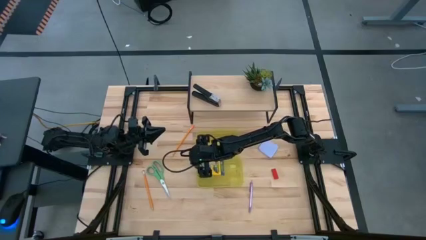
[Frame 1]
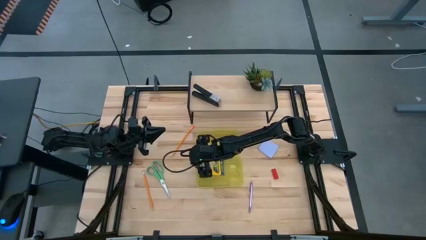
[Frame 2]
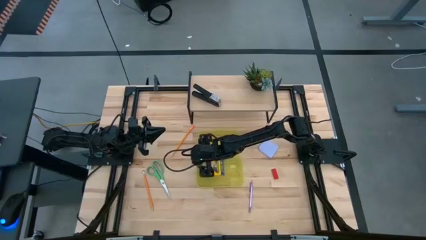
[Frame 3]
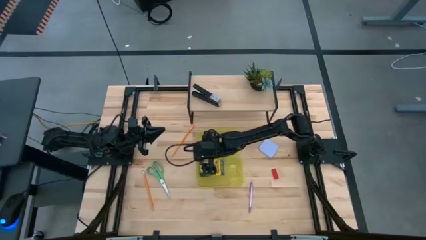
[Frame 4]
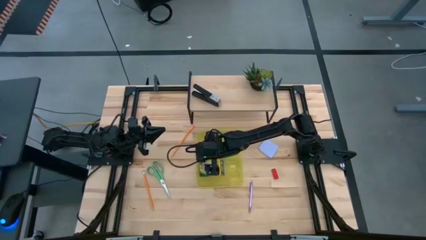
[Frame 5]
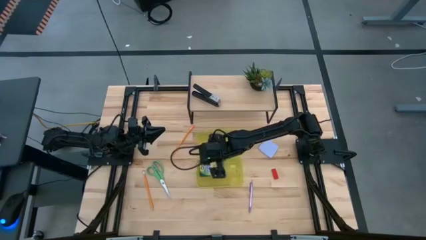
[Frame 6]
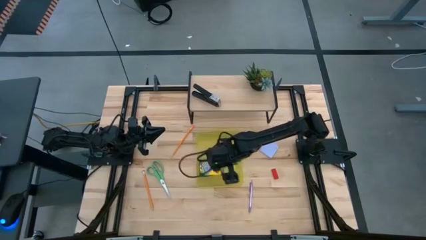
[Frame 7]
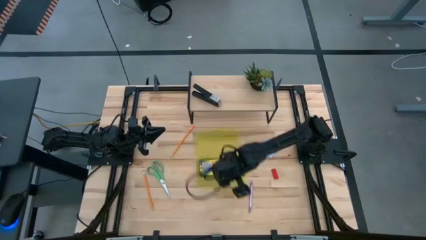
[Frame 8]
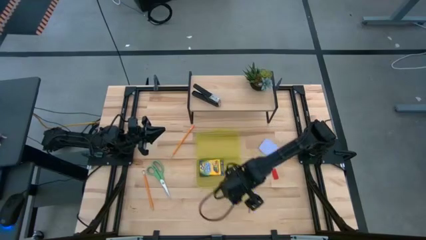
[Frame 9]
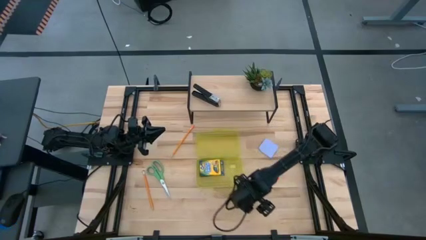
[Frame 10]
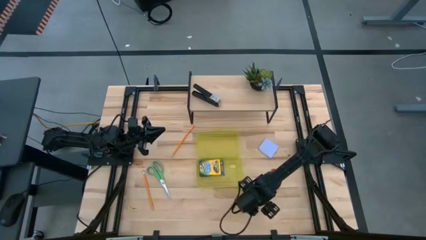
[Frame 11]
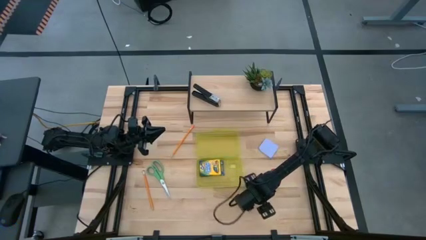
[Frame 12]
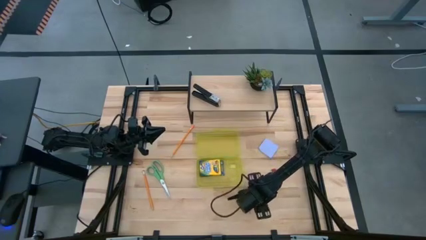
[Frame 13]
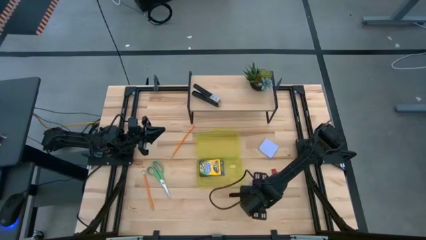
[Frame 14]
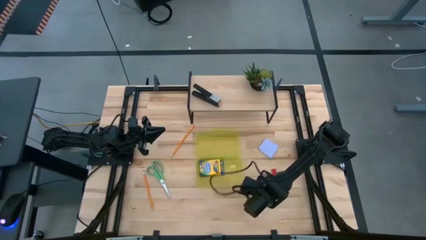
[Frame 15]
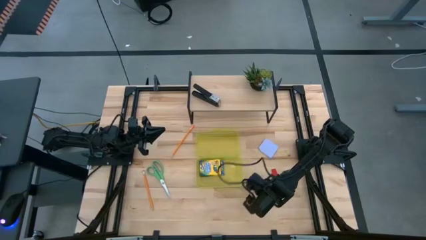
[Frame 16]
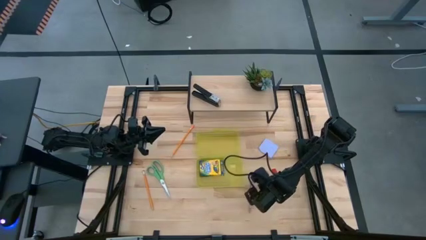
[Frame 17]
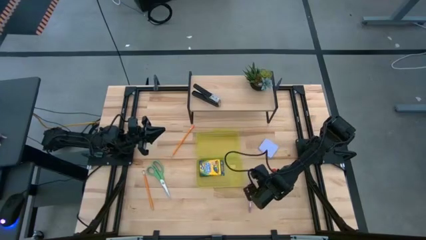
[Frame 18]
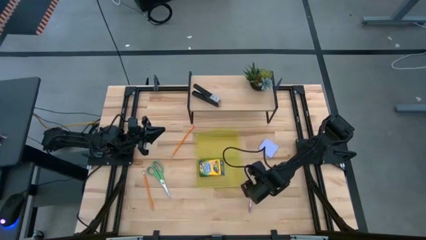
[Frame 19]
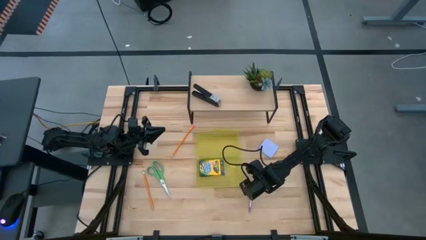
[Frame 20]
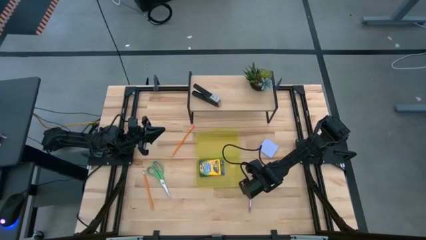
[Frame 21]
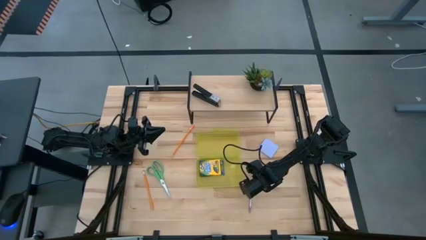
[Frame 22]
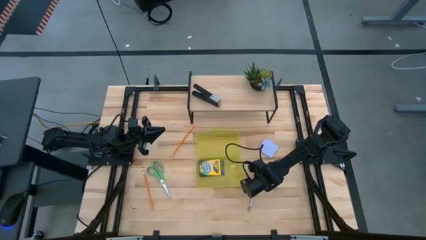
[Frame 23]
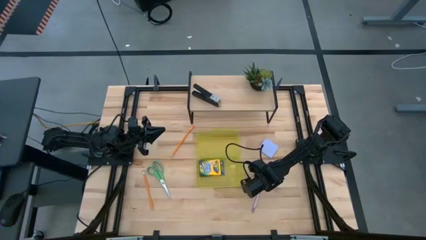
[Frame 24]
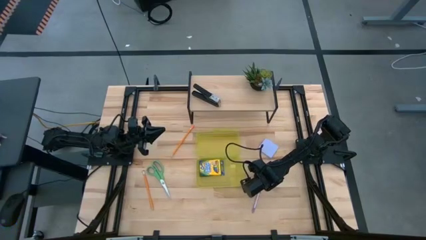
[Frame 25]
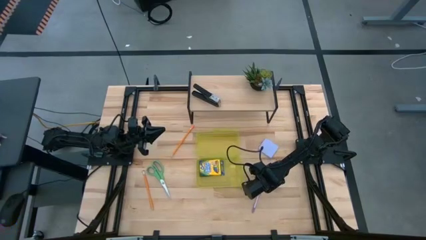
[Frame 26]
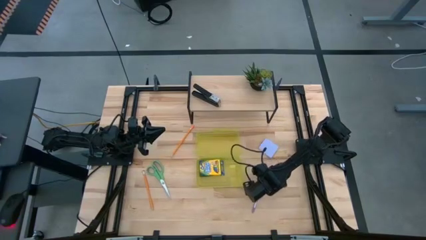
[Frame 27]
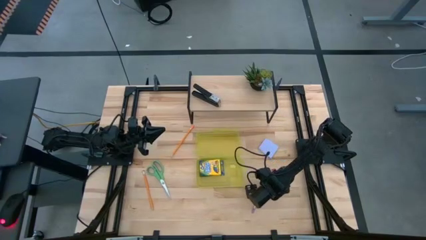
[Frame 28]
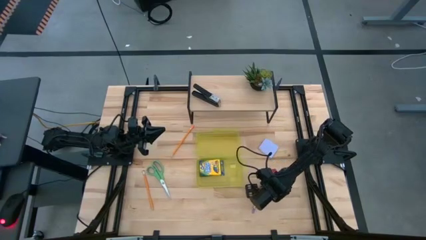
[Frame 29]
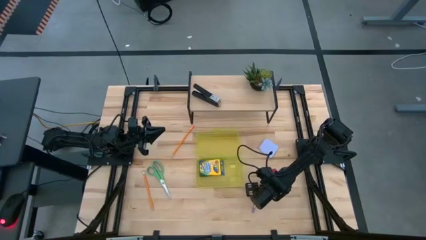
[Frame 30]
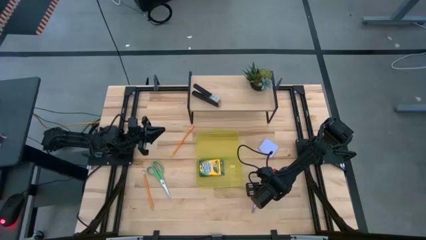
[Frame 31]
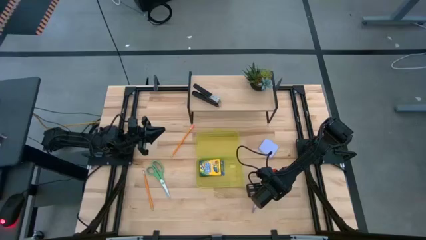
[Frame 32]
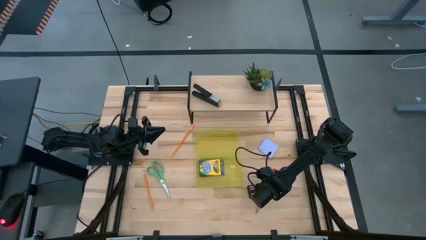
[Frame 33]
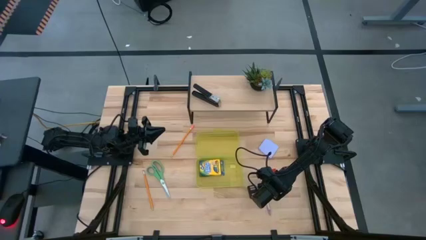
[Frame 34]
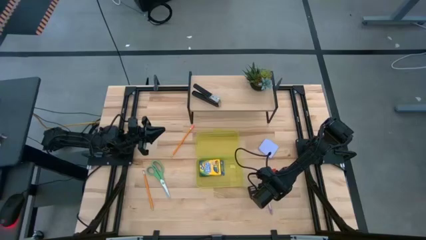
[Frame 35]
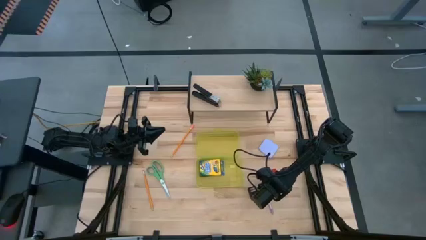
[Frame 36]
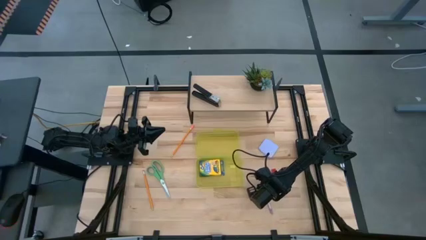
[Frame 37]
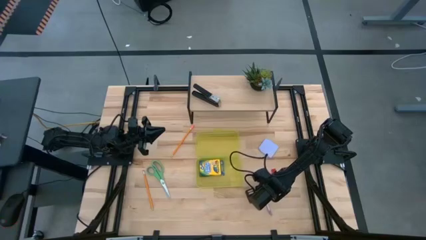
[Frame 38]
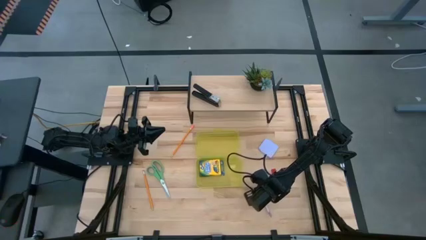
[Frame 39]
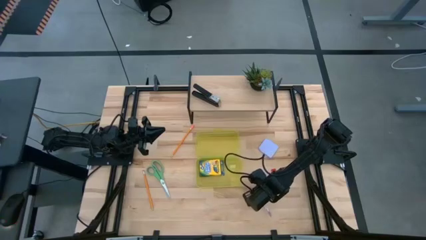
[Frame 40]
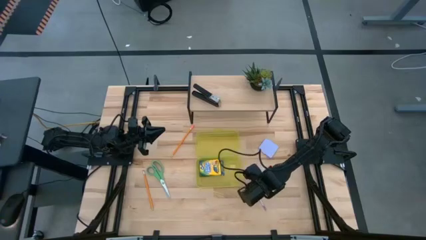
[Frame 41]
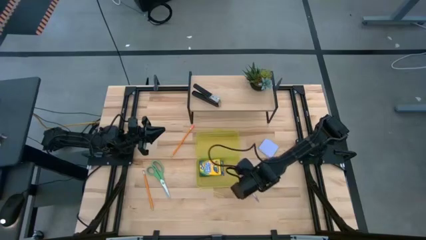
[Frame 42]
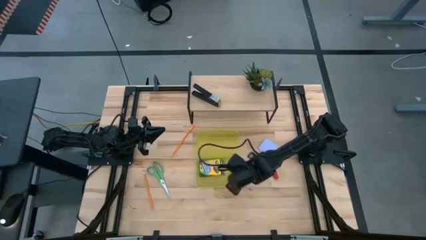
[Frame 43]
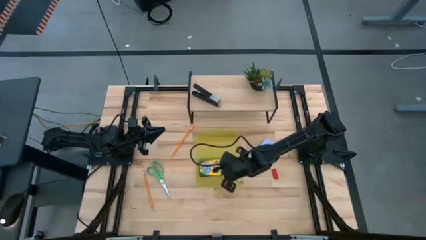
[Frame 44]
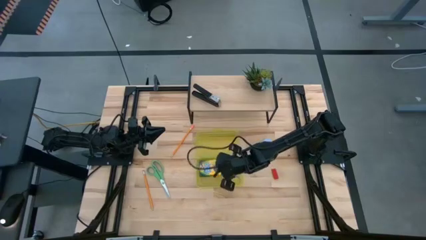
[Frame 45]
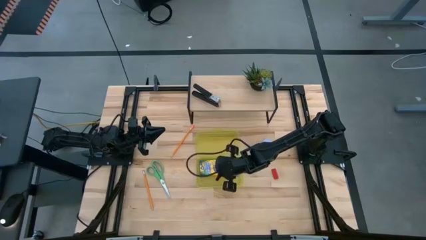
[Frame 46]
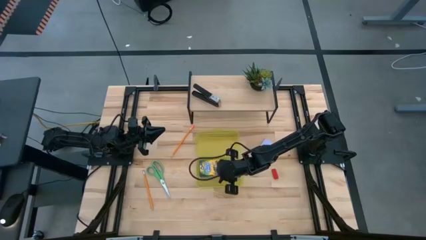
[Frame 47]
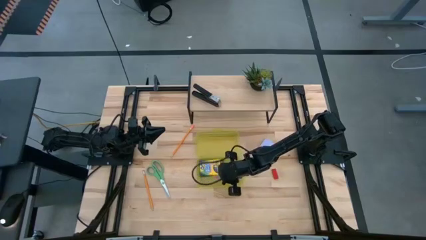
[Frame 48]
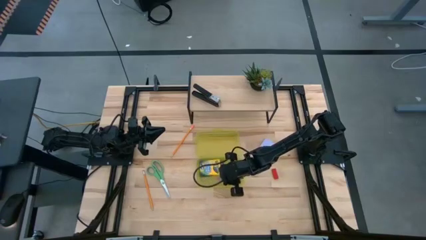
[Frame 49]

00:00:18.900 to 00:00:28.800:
Task: Pack school essentials
Put the pink mechanical pencil into the yellow supply box

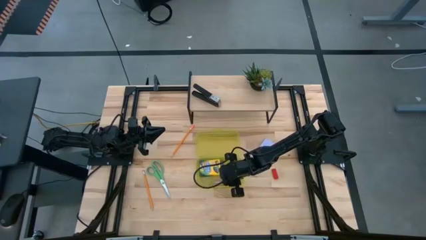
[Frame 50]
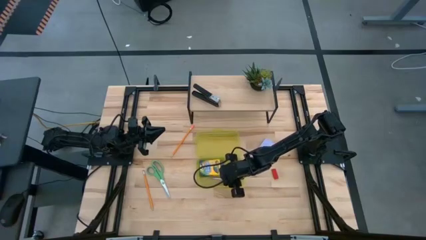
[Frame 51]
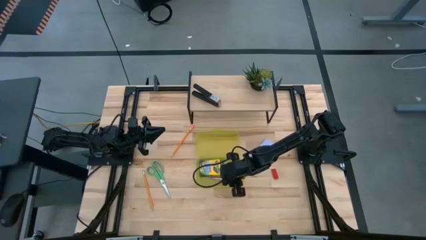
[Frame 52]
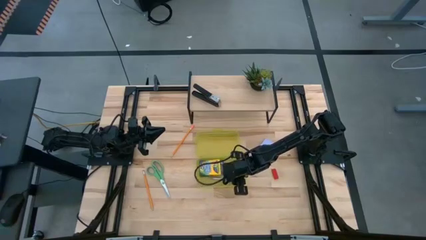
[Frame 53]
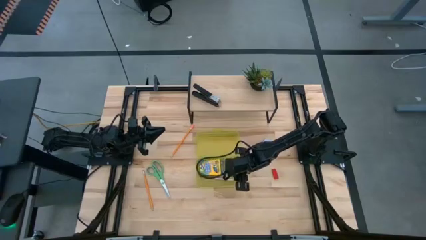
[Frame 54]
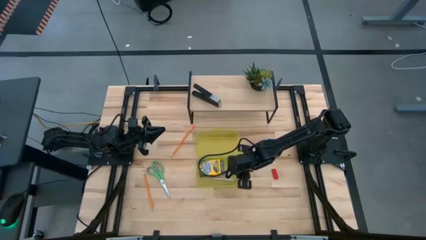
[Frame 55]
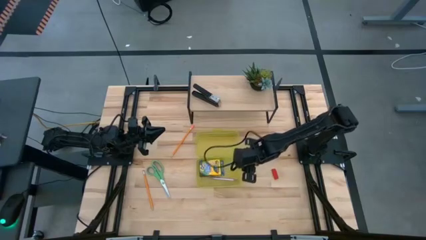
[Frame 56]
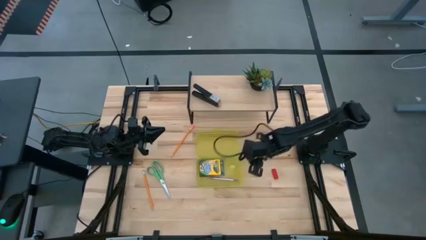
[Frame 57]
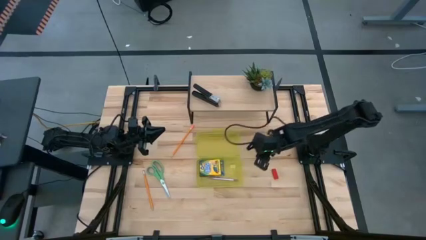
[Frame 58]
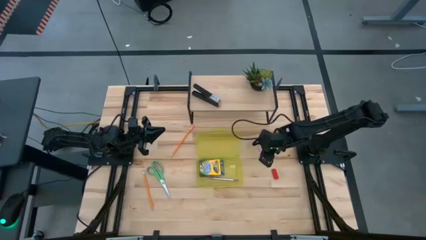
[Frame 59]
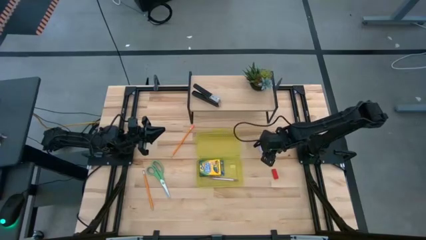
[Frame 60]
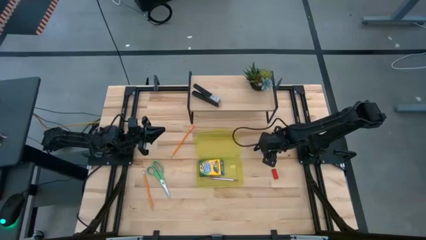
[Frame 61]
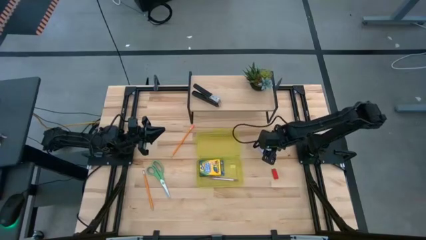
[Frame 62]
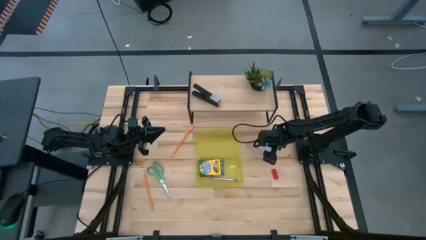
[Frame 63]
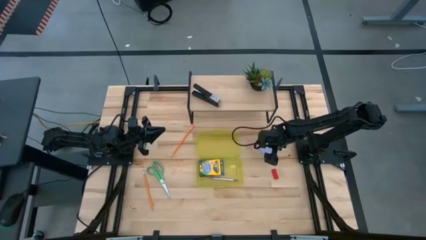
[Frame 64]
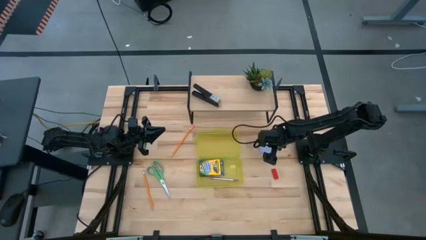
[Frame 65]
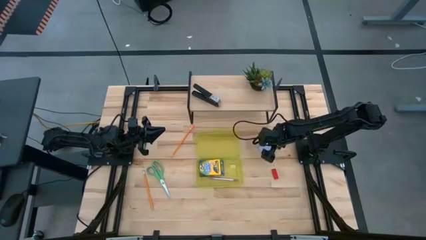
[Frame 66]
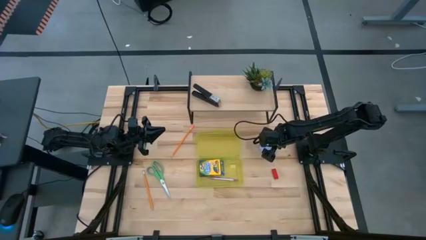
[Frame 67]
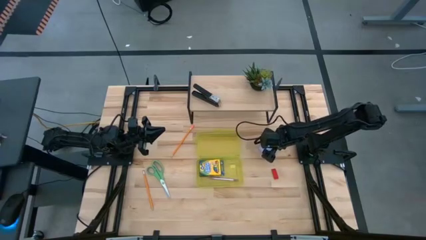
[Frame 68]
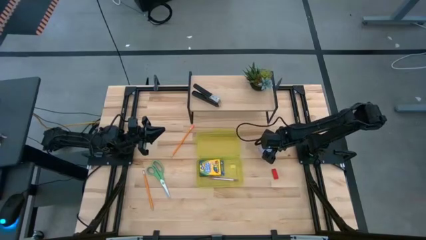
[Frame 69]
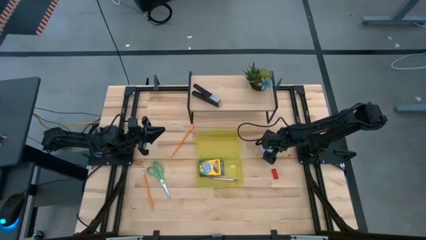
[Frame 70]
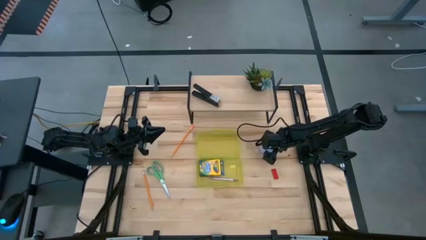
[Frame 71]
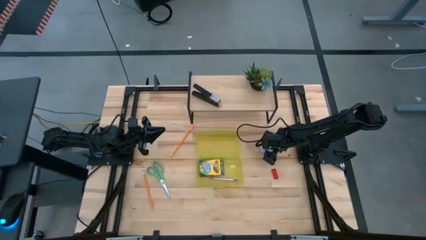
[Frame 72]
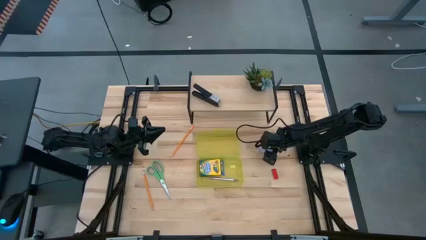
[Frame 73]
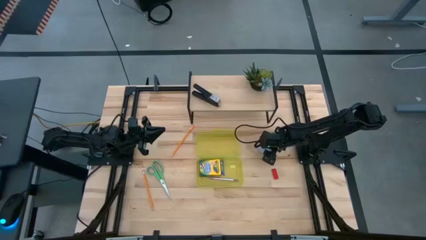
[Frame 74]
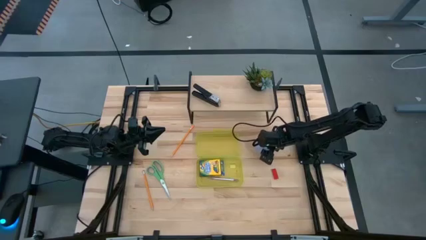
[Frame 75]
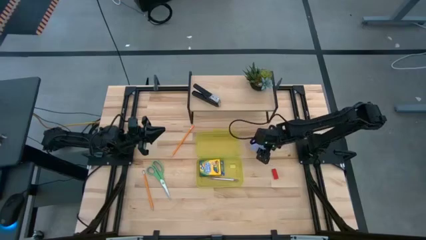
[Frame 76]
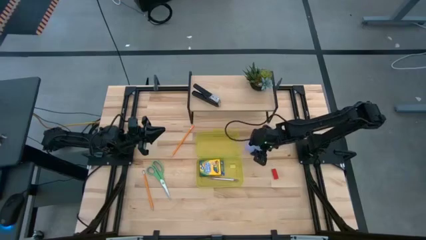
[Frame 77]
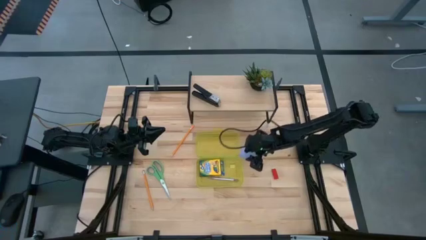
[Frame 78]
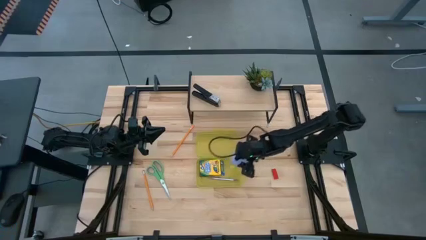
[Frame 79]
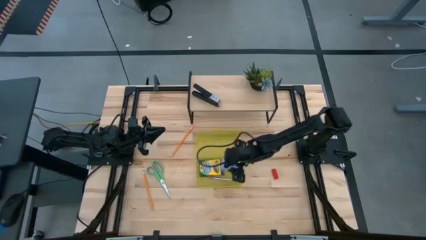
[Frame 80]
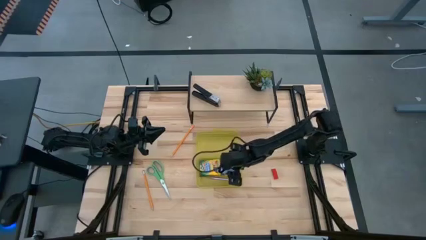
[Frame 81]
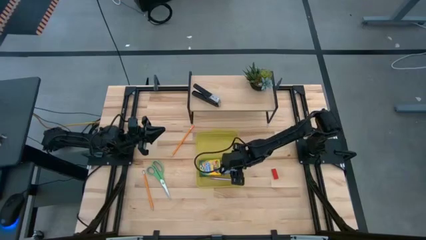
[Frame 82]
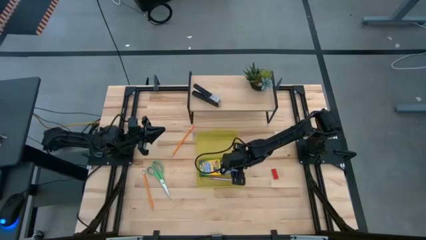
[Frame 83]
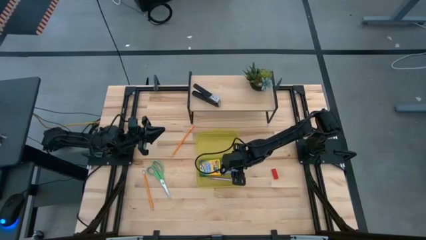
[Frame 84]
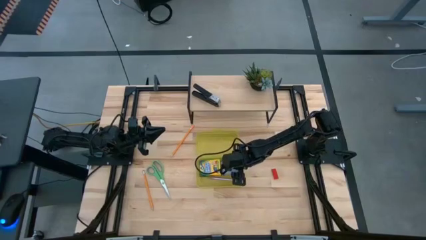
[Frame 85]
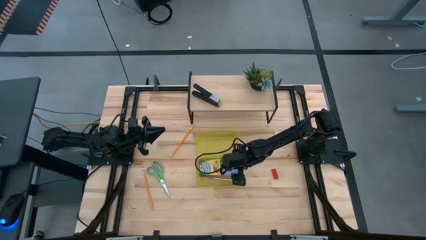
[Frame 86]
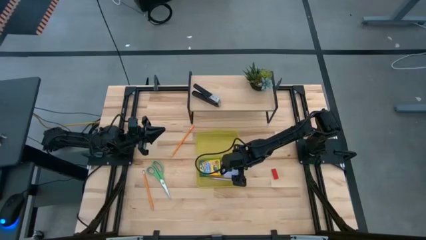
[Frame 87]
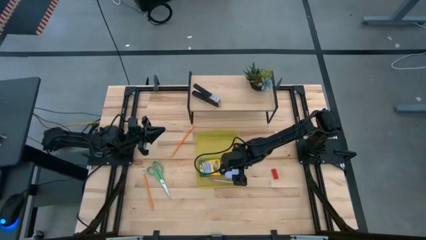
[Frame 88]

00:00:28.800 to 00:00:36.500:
Put the purple sticky note into the yellow supply box
